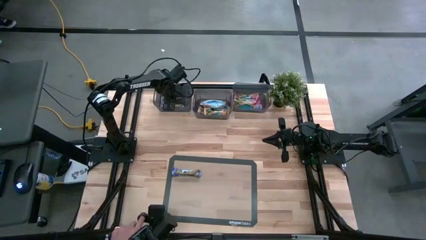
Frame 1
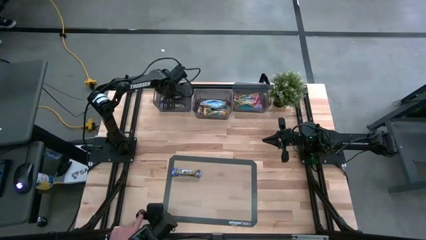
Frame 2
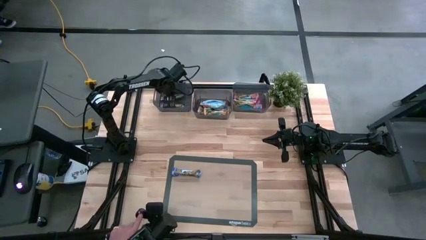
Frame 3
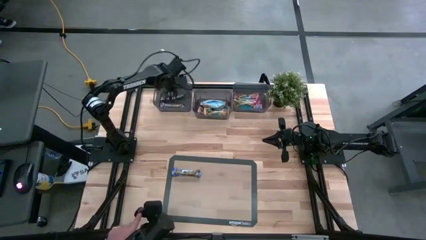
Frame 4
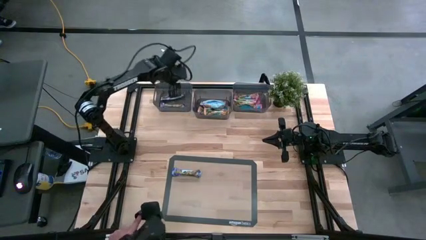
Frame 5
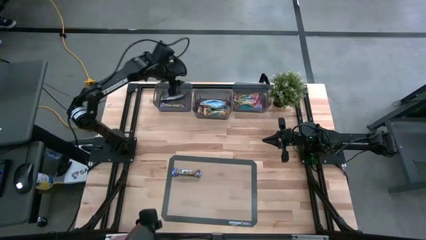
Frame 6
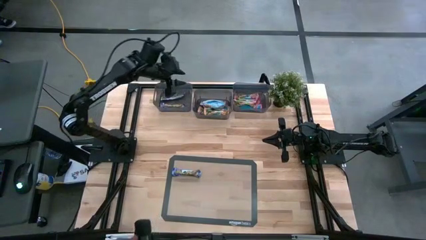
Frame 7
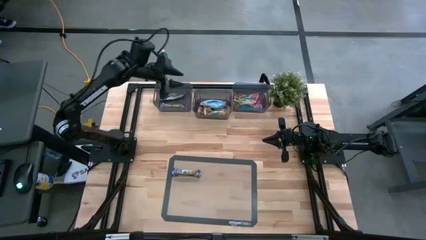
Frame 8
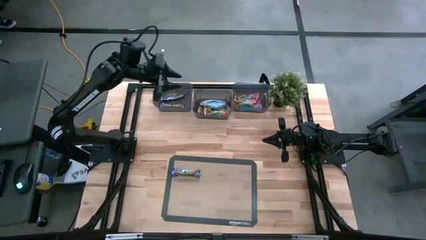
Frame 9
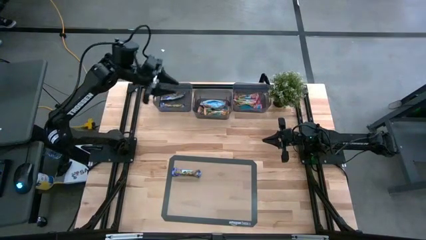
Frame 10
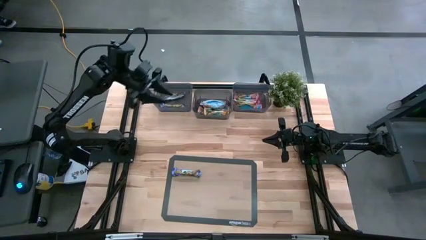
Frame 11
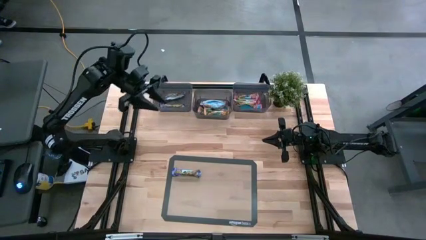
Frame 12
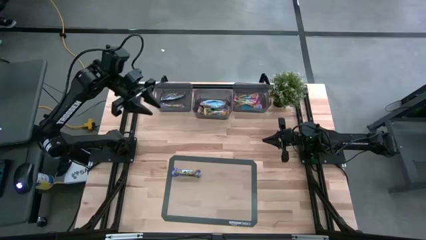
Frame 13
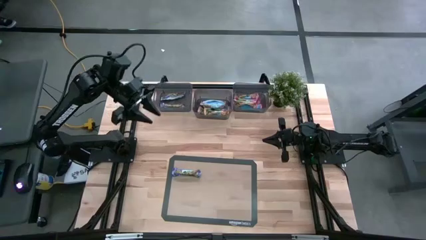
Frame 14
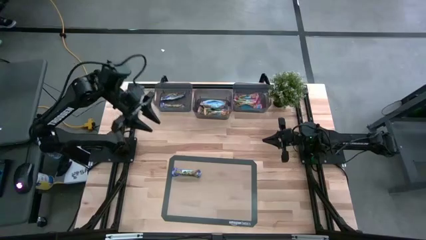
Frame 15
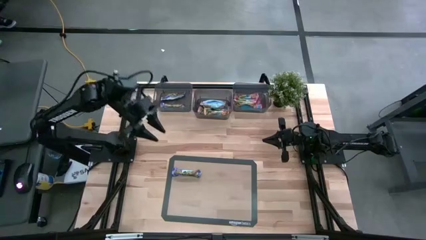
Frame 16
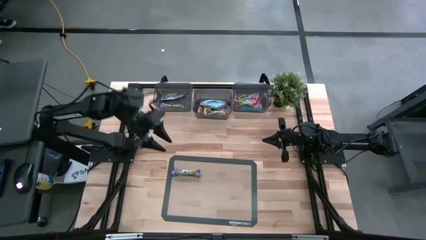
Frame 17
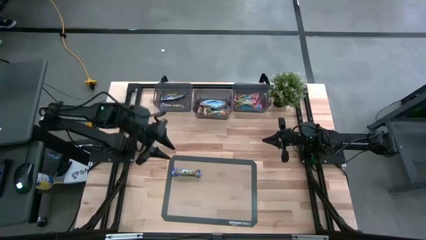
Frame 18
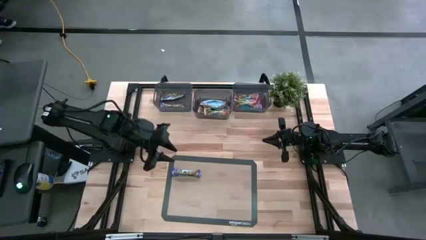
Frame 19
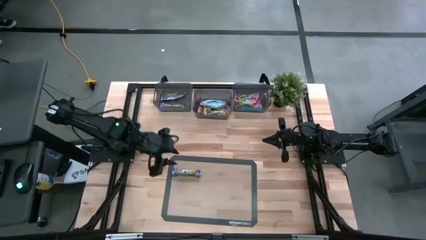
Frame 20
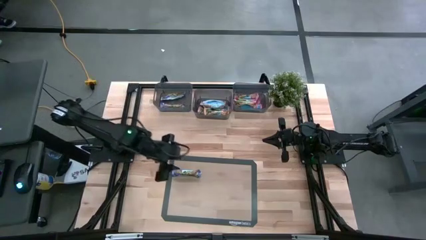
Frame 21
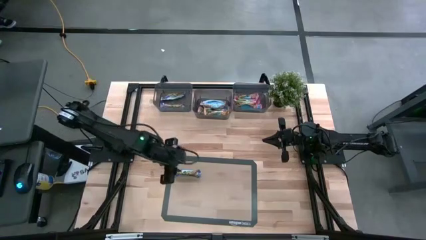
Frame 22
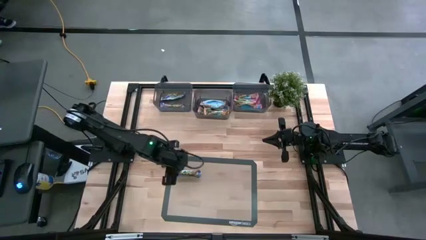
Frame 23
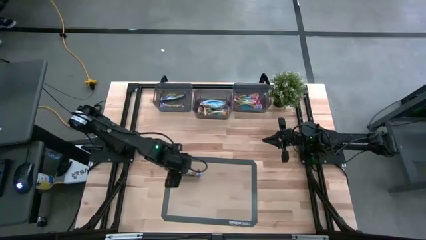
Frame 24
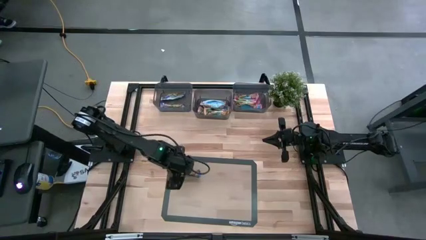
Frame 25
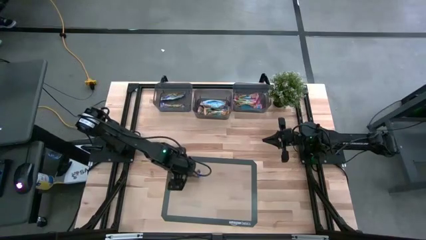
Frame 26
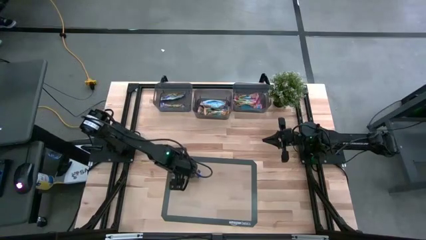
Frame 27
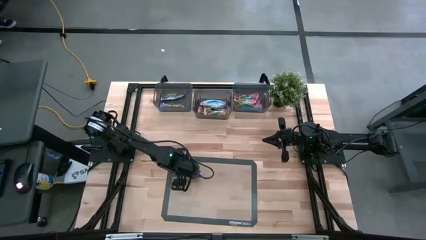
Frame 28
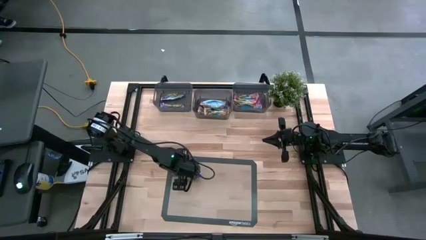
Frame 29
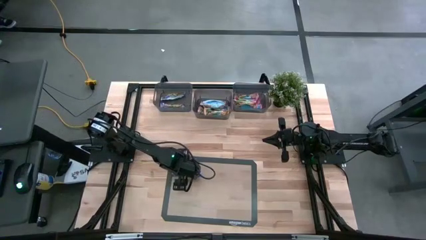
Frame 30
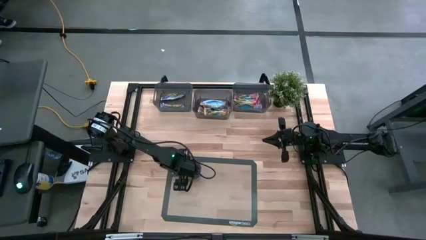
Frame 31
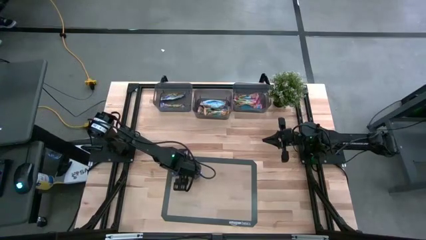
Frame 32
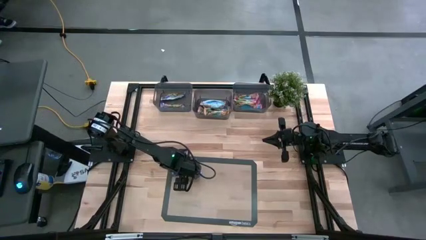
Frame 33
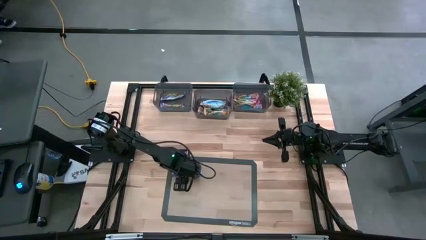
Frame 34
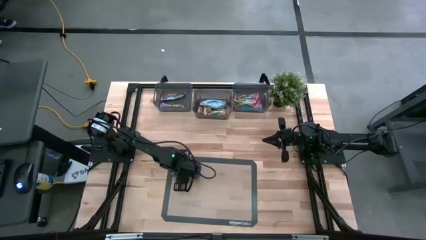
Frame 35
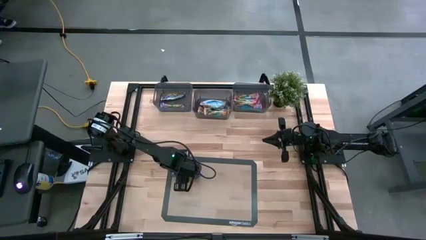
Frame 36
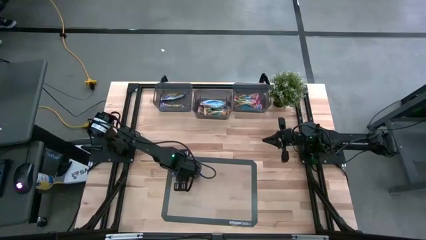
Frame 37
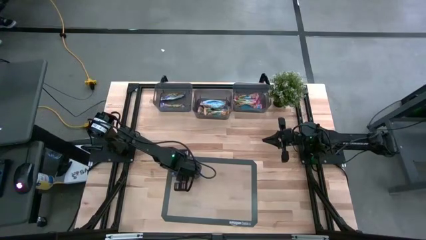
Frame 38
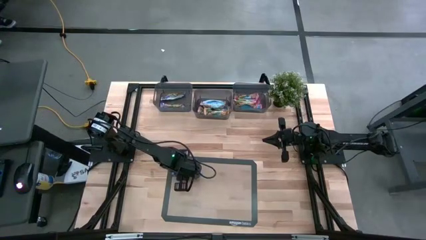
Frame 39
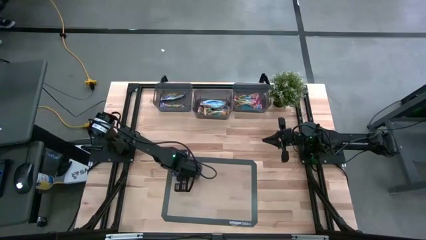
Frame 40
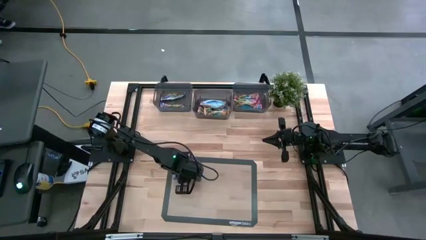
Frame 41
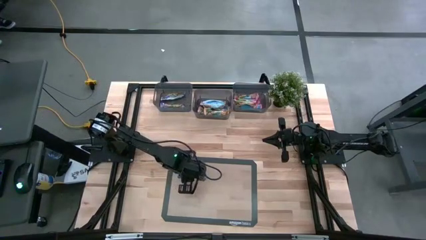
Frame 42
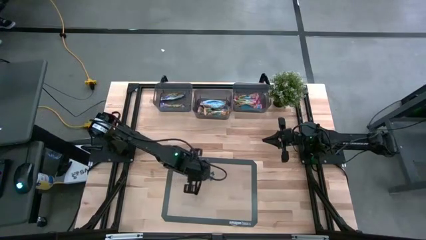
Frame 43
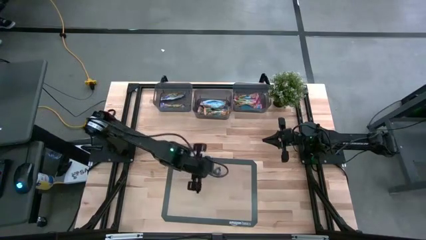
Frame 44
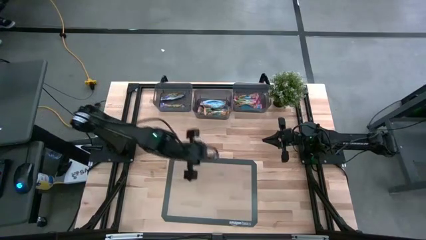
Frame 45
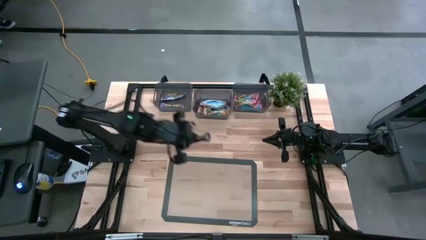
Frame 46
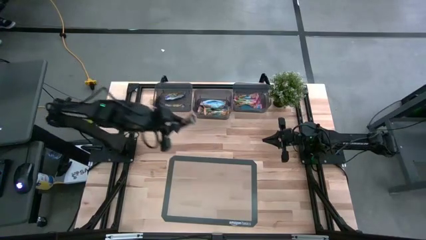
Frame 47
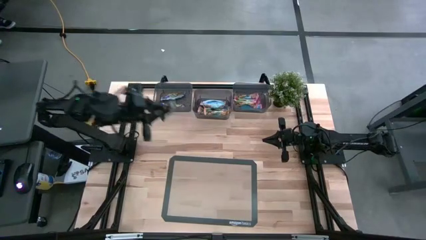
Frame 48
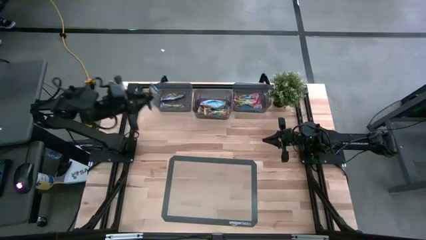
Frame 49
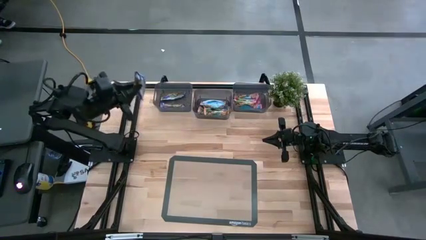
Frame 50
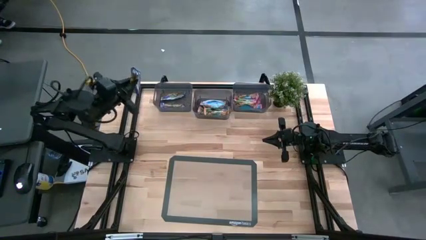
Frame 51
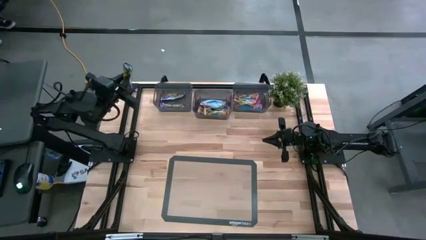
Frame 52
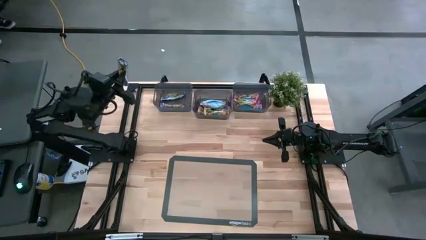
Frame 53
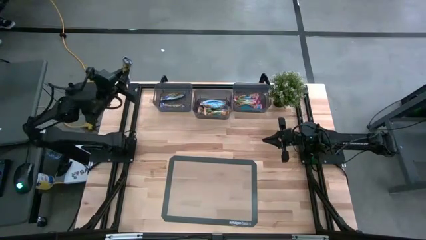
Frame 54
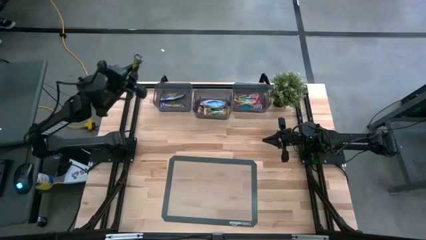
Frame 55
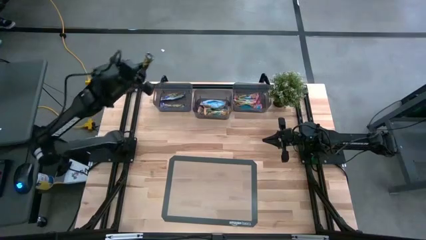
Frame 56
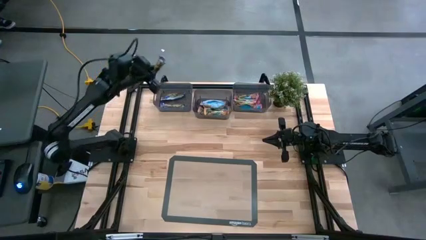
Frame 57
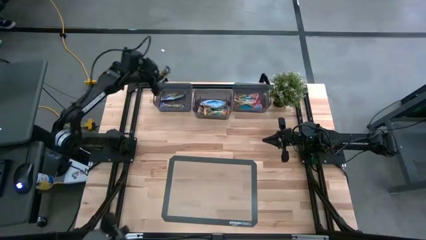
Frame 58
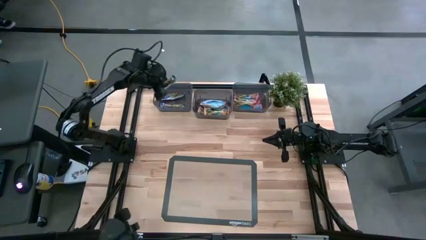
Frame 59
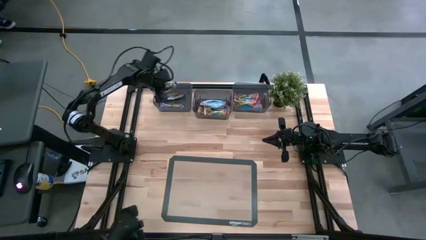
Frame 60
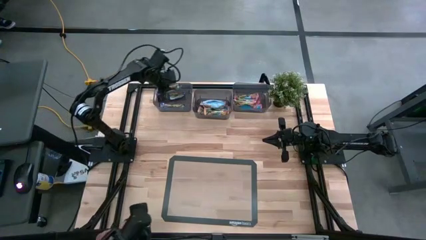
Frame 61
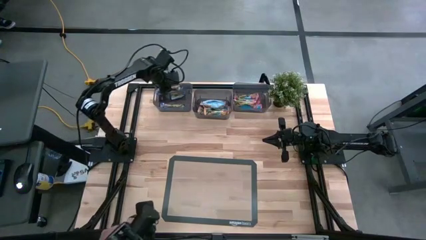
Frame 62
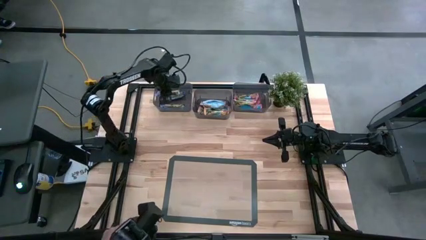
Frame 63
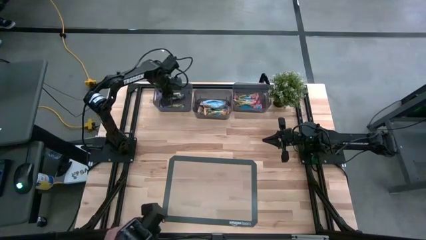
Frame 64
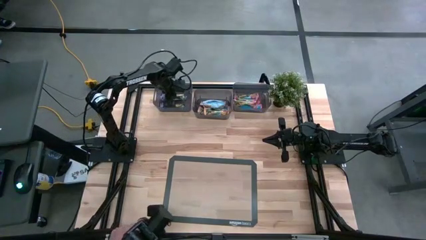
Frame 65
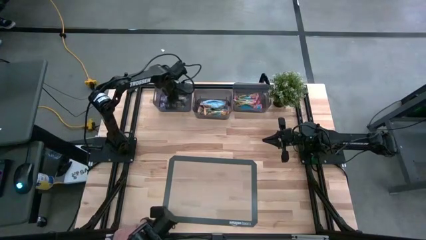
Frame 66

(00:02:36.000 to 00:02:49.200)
Task: Pick and place Granola Bars by type
Put the blue granola bar into the left black bin

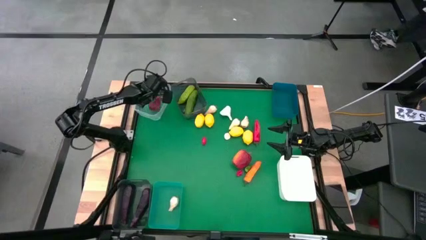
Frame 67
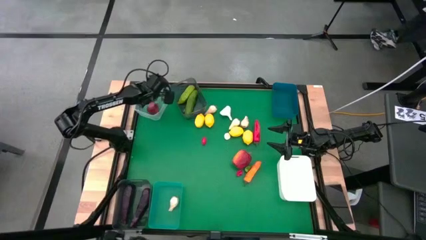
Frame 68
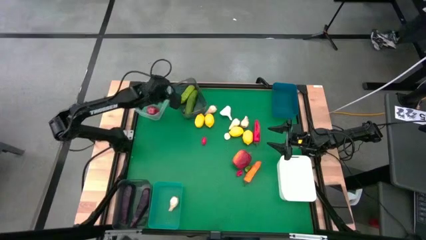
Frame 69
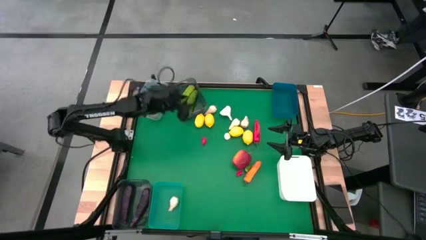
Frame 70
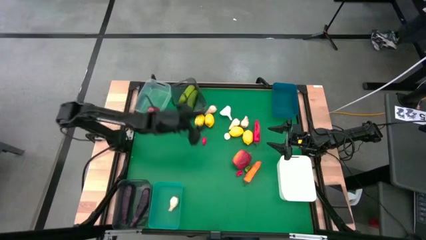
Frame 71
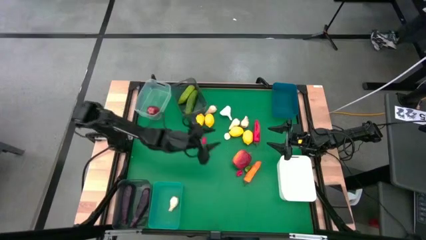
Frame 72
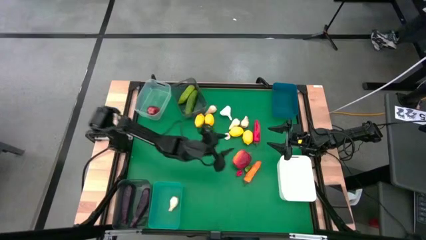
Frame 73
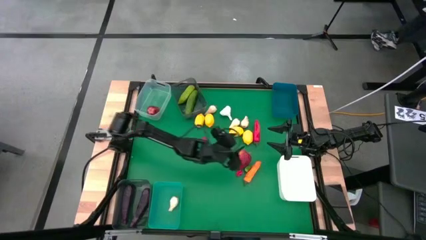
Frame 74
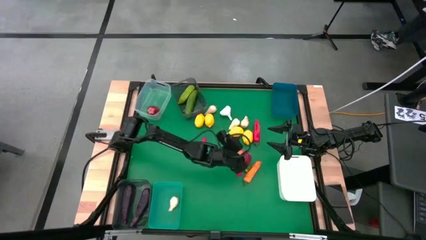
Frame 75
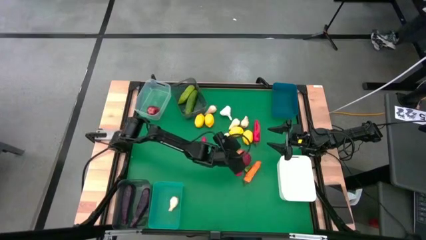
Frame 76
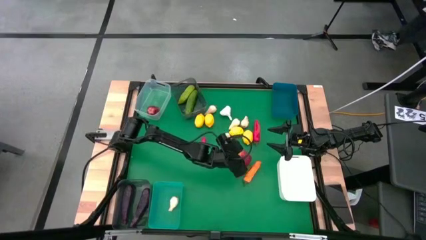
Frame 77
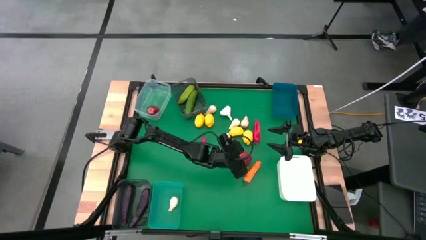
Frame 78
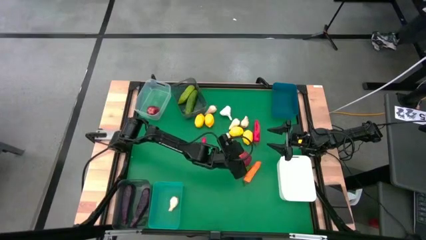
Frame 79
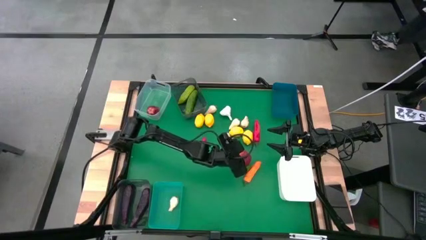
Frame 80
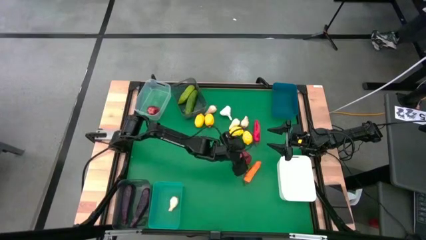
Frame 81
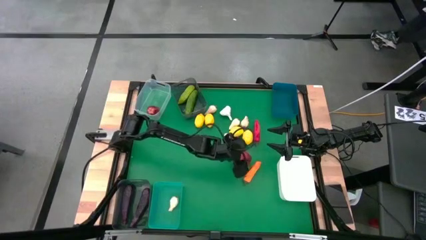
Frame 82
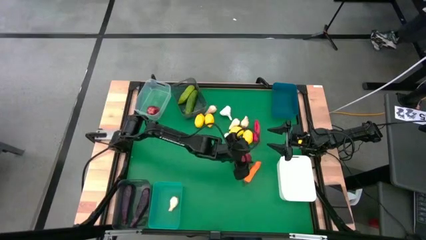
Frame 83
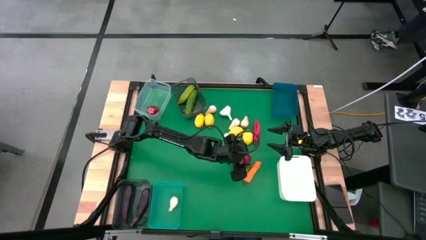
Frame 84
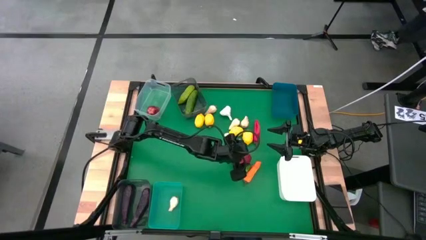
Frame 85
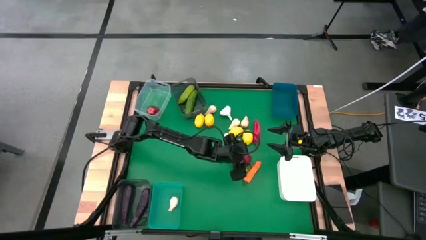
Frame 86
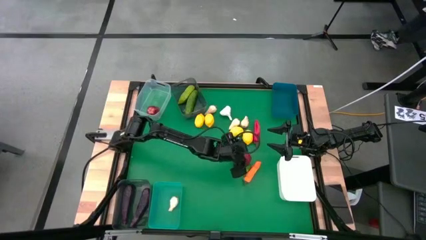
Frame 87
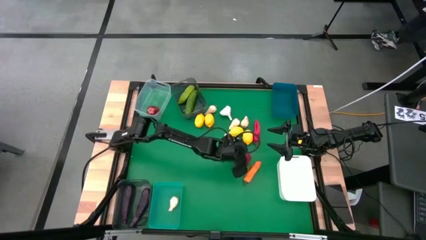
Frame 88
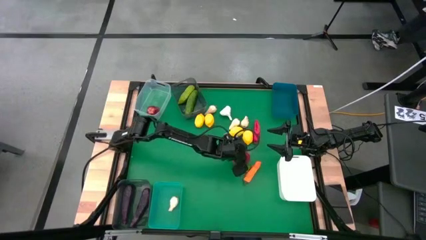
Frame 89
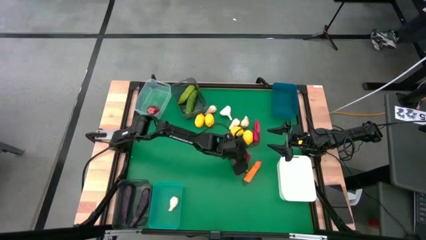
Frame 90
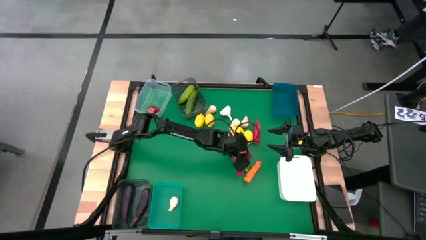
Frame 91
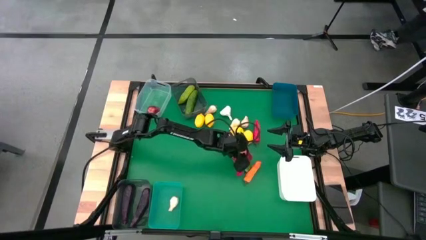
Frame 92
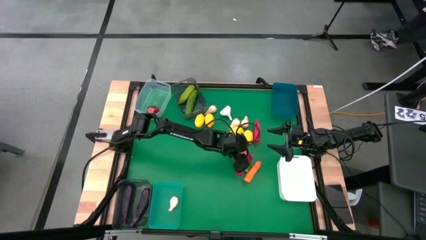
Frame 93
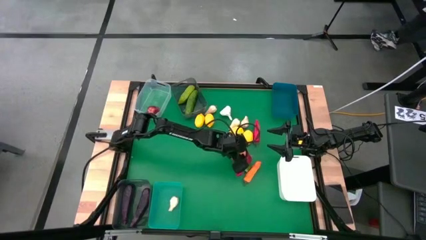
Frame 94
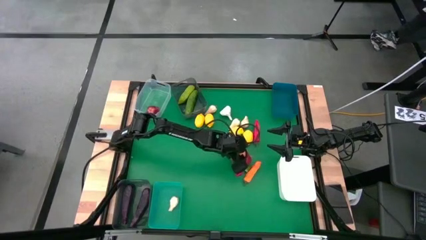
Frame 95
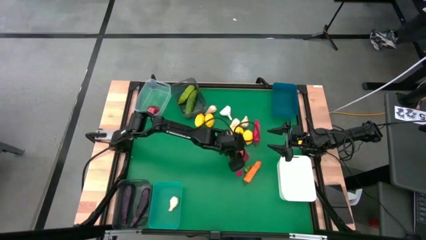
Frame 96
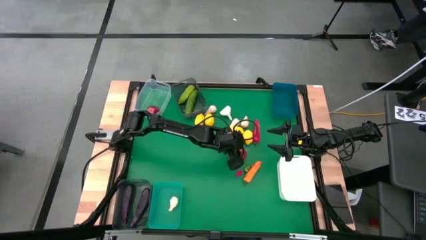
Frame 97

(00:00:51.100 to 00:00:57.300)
Task: Sort produce into baskets
Put the apple into the transparent bin
